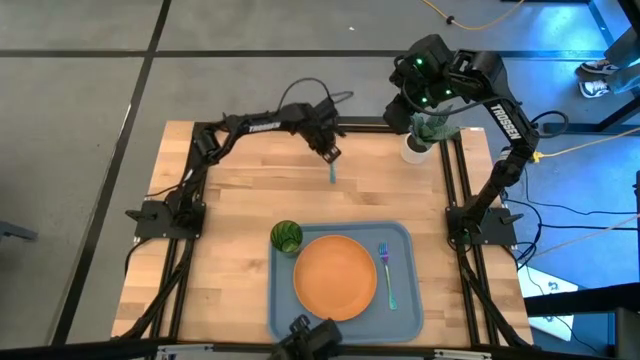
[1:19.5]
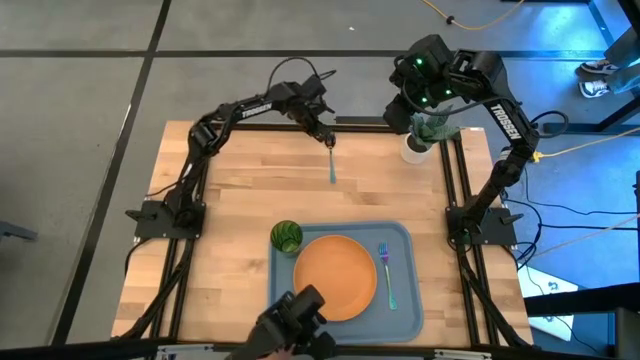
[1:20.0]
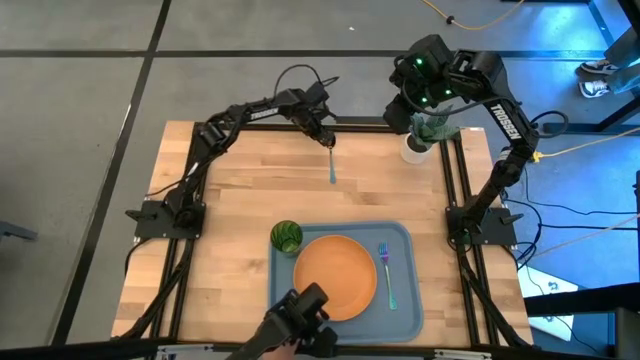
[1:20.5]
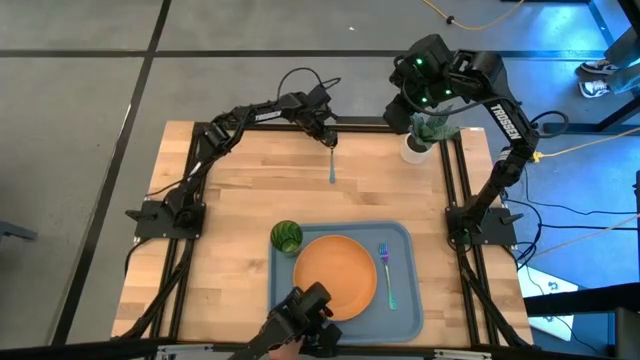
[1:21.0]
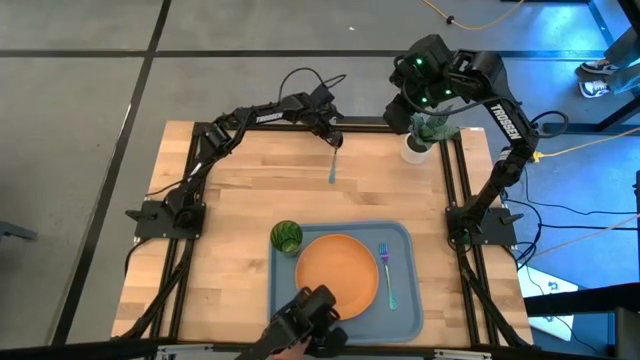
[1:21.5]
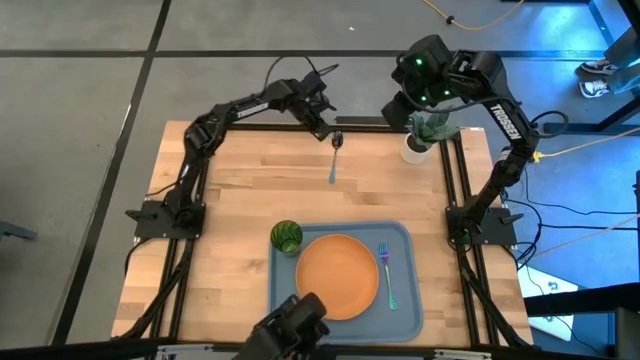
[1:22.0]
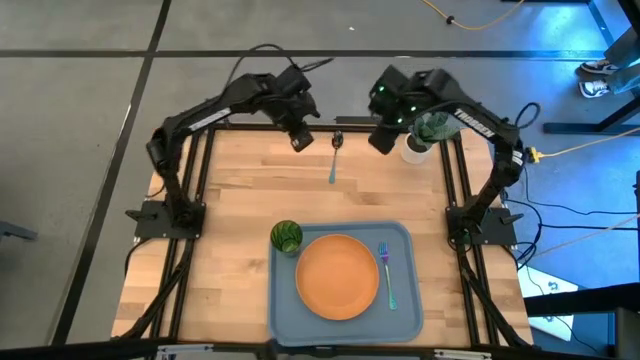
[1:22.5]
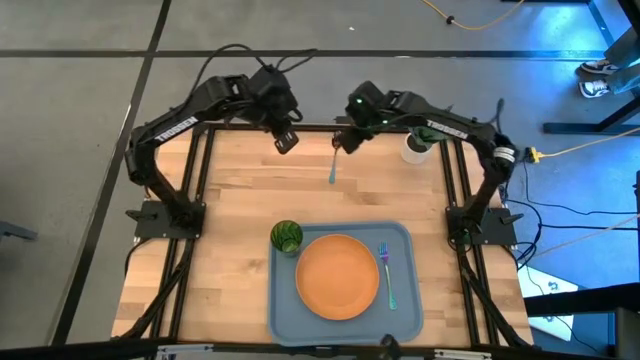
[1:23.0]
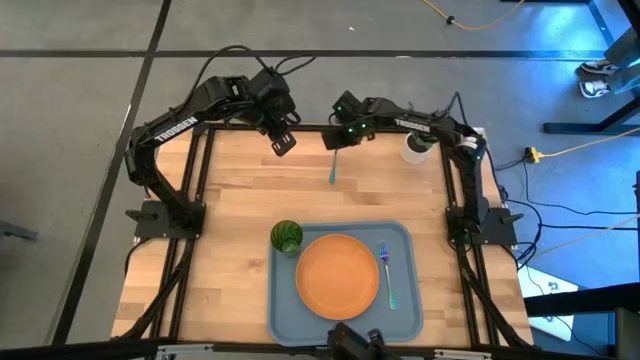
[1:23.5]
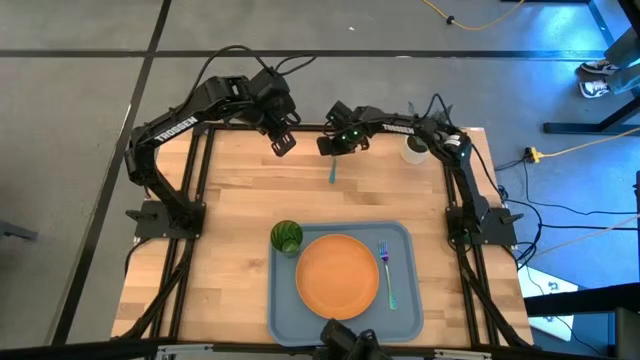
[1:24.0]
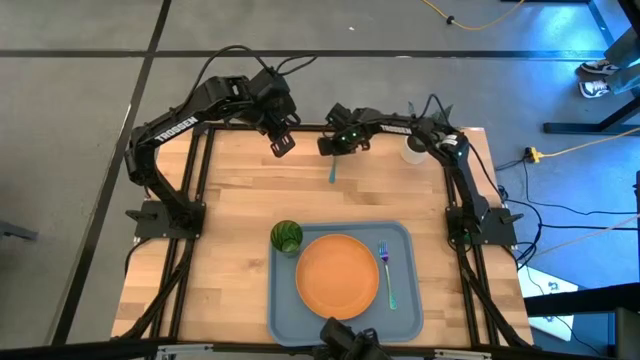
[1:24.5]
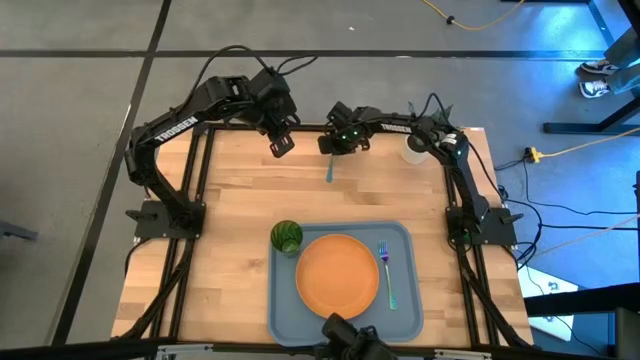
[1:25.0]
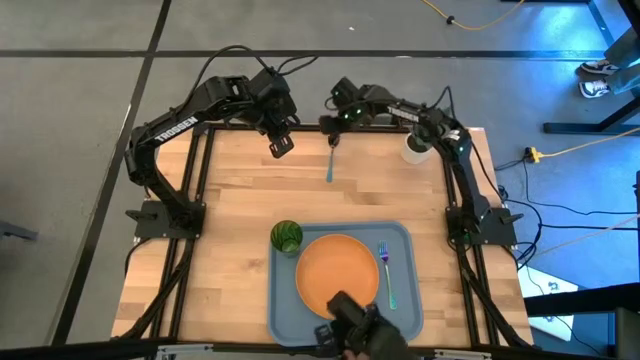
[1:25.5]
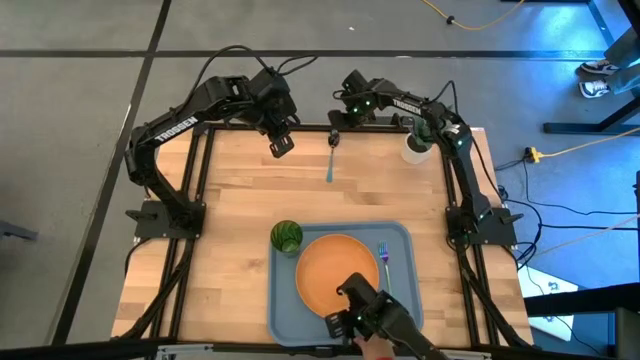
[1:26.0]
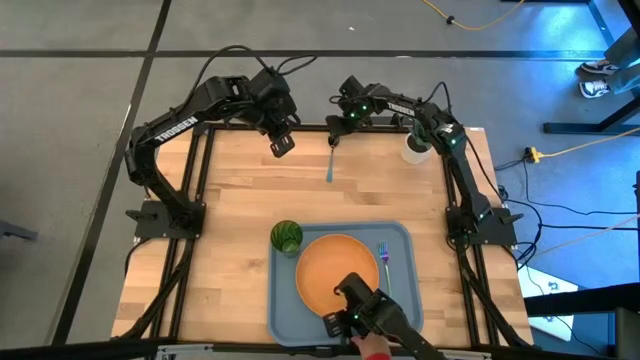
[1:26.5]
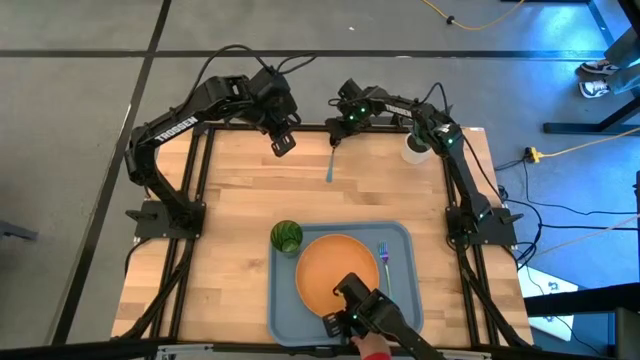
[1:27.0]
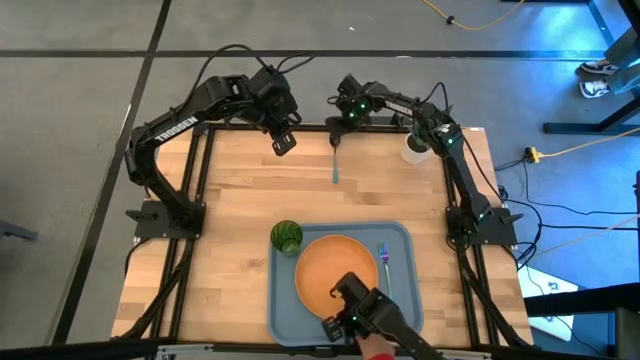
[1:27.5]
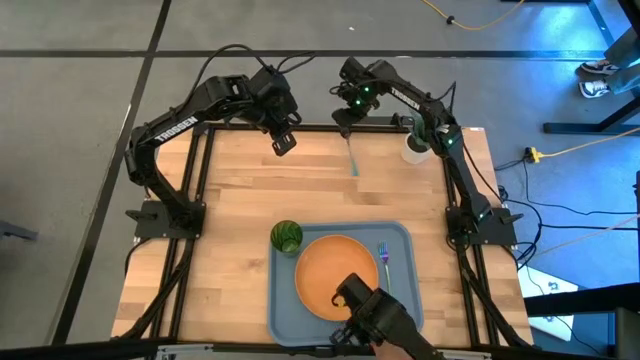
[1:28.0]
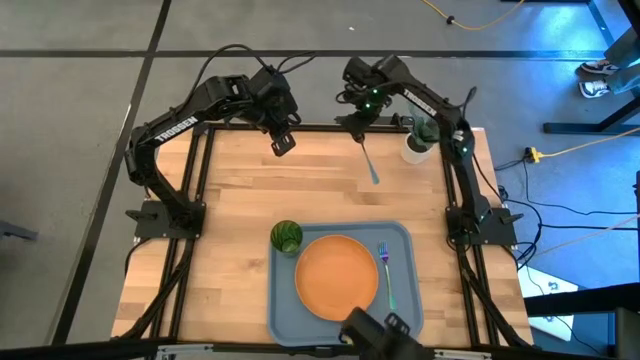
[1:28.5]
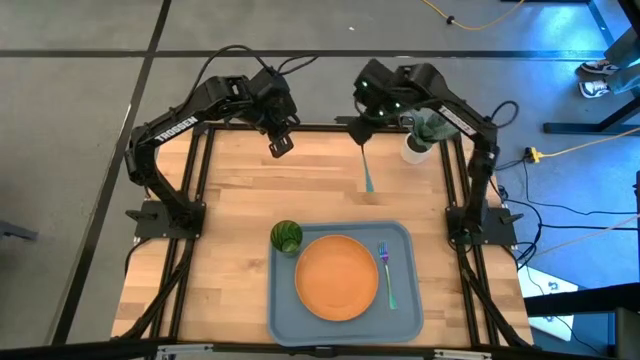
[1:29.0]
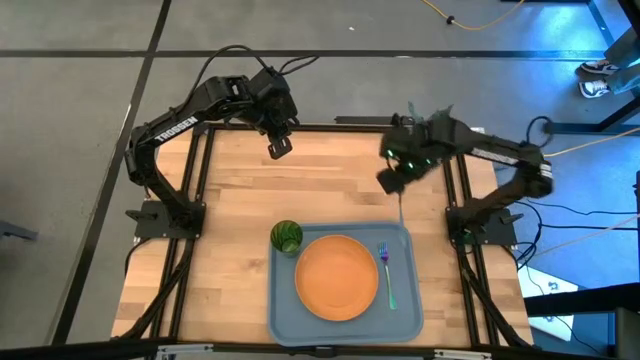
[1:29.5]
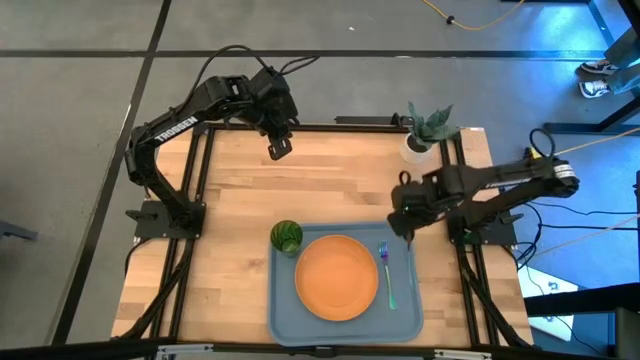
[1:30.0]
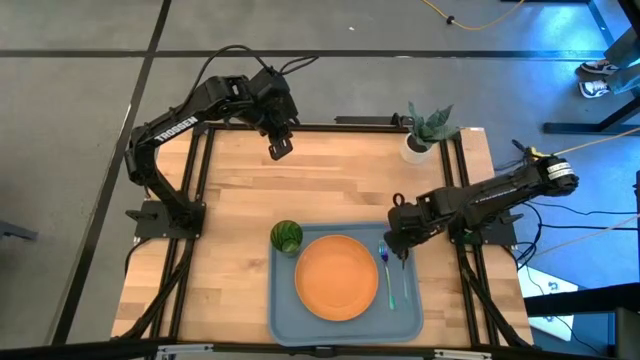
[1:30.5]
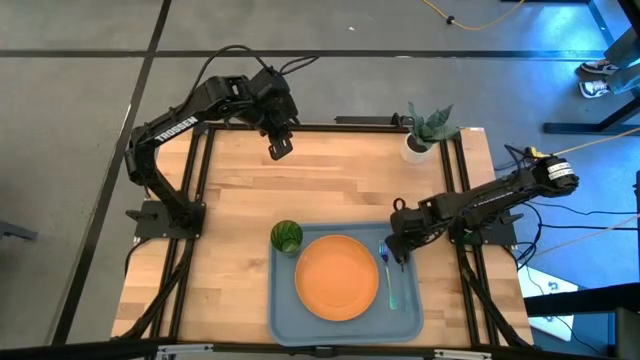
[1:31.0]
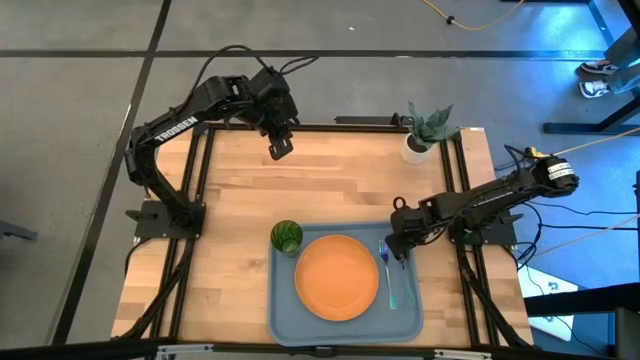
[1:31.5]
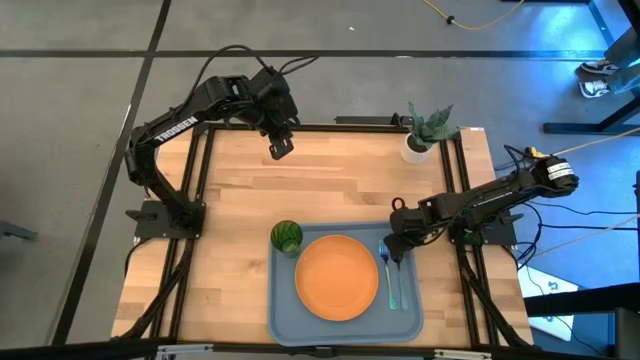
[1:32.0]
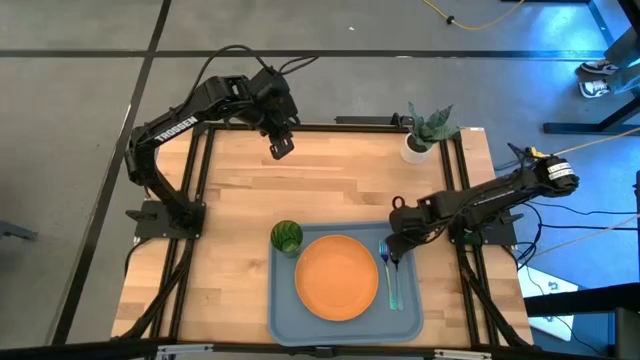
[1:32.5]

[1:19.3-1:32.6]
Task: Pick and place plate/cup/fork/spoon on tray
Put the blue spoon on the right side of the green fork on the gray serving tray

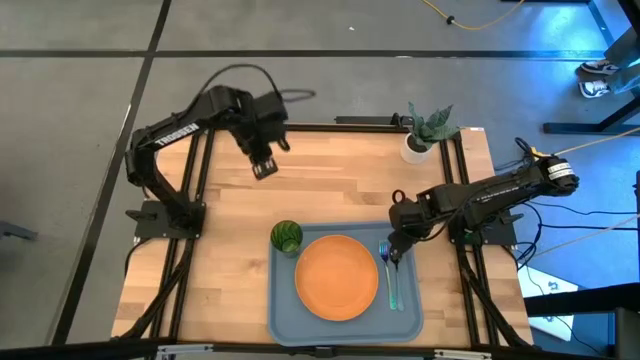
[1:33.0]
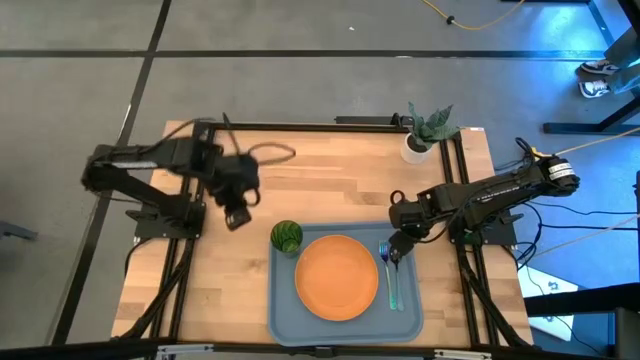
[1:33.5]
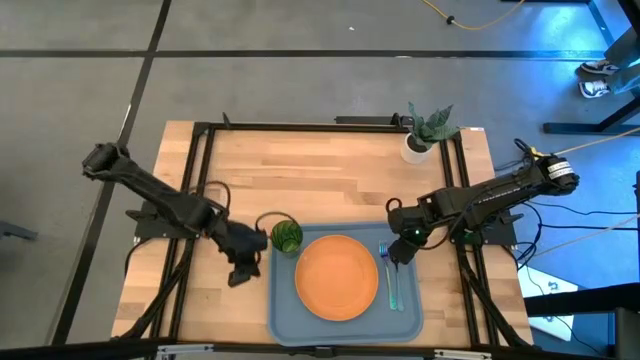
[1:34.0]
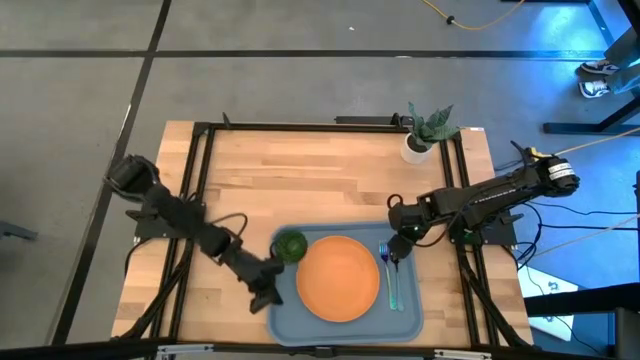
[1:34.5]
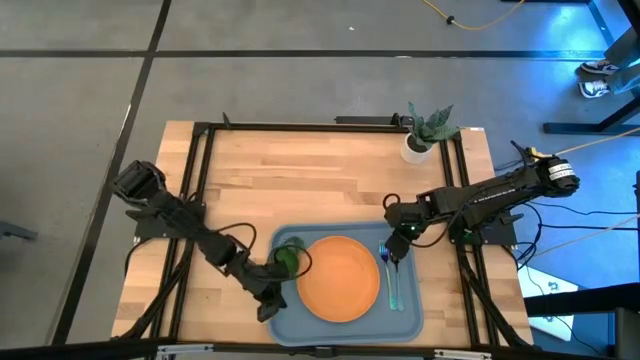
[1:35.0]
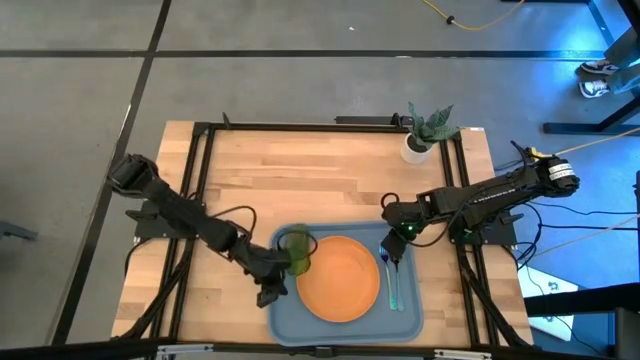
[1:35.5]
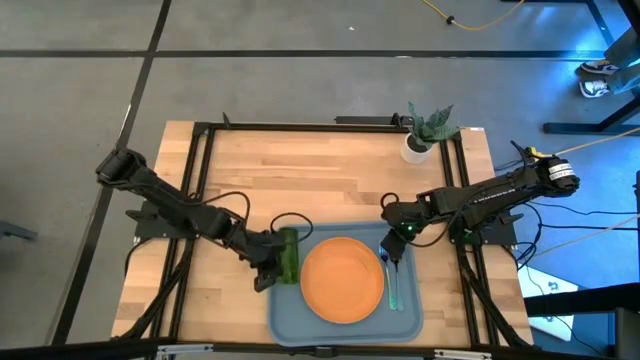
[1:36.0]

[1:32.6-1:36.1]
Adjust the green cup

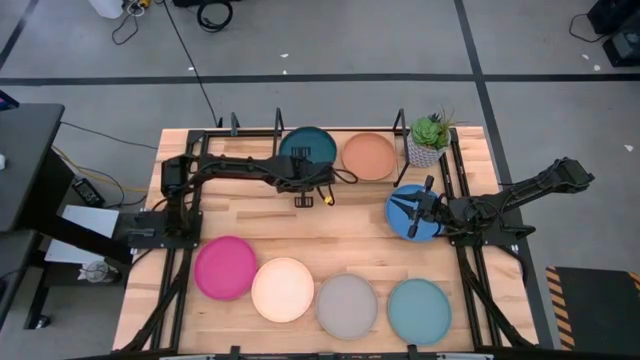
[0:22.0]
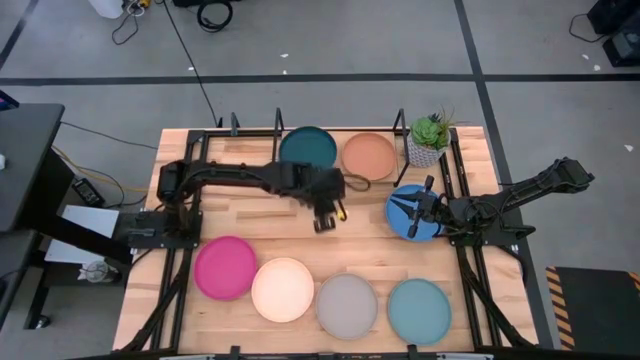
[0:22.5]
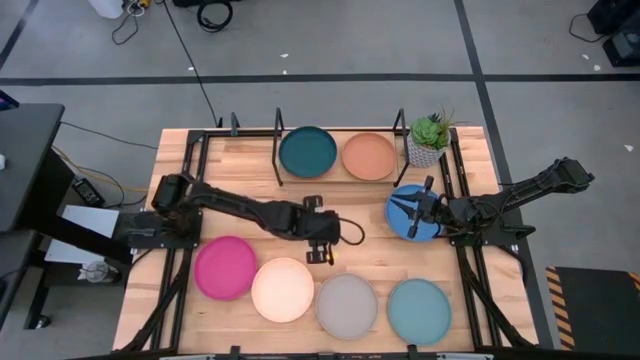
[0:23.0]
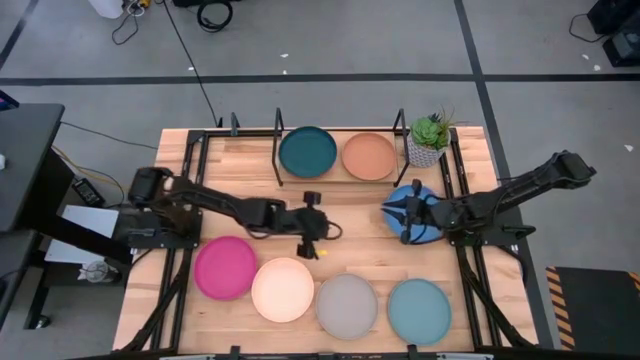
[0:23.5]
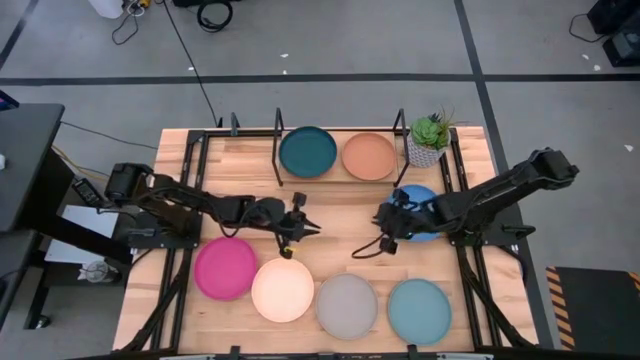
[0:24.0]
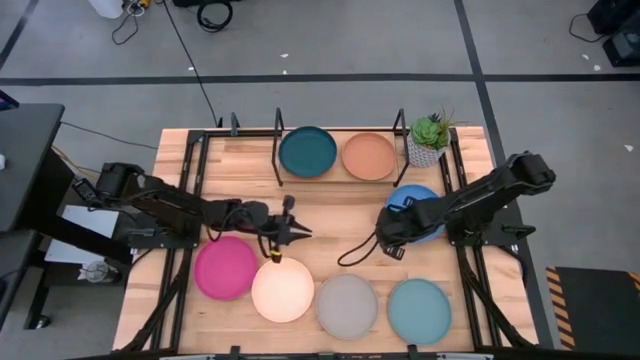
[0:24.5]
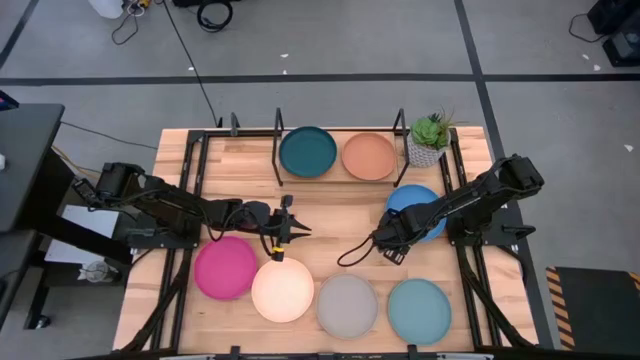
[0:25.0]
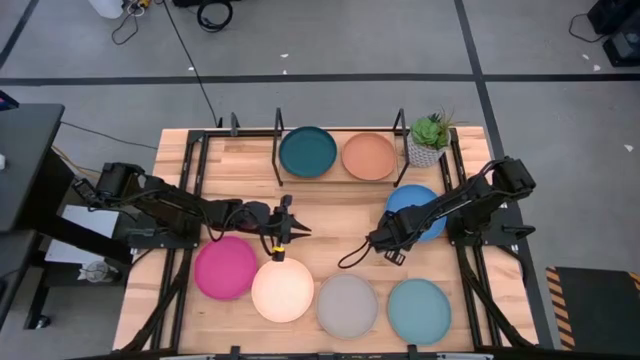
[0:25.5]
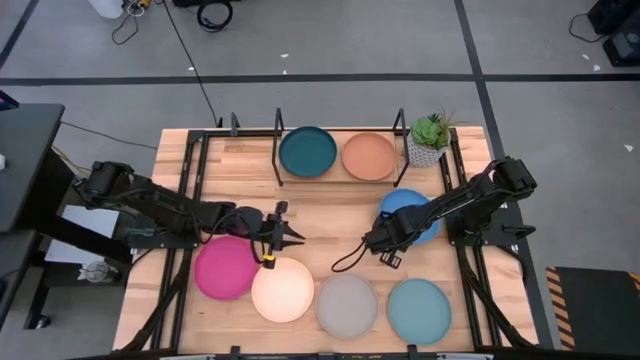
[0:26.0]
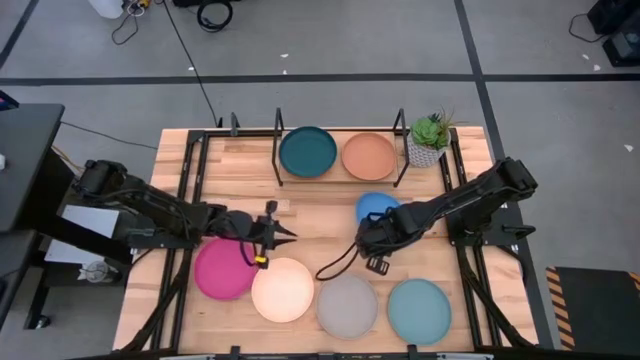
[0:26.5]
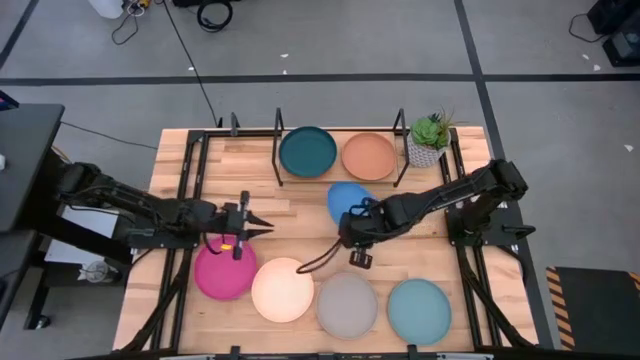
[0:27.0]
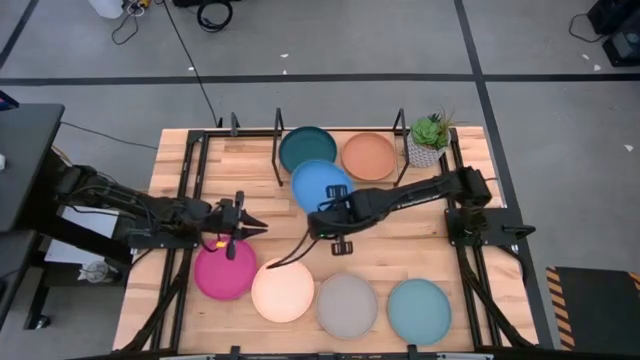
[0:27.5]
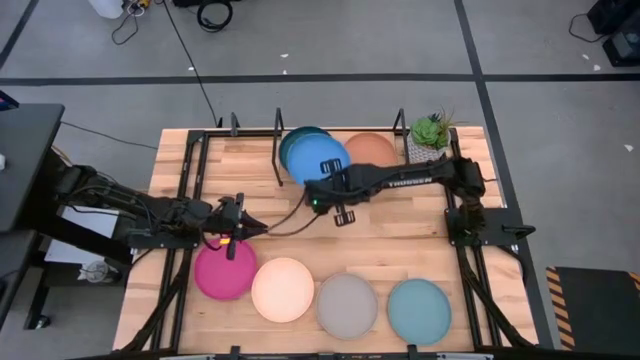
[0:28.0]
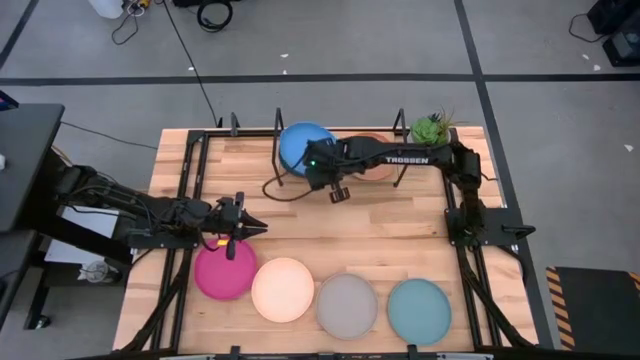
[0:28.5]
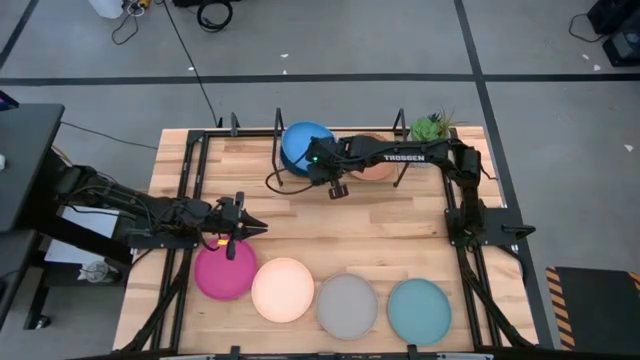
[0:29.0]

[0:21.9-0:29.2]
Task: Place and stack plates onto a shelf
Stack the blue plate on the top of the stacked plates on the shelf
